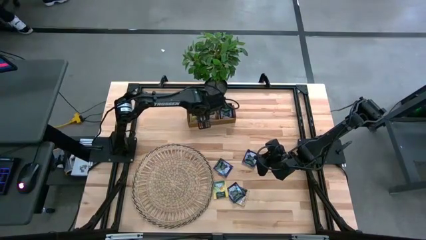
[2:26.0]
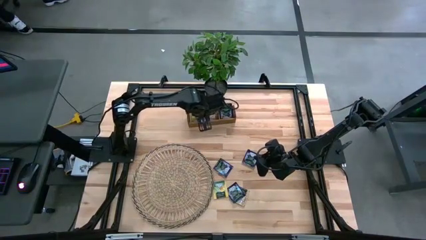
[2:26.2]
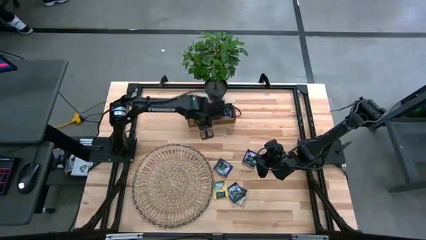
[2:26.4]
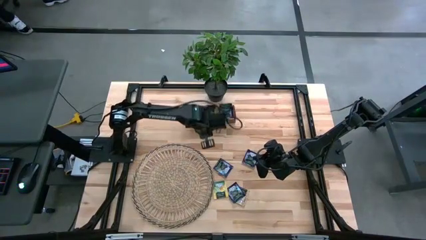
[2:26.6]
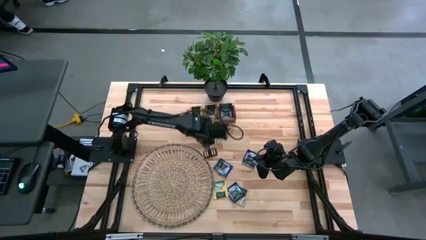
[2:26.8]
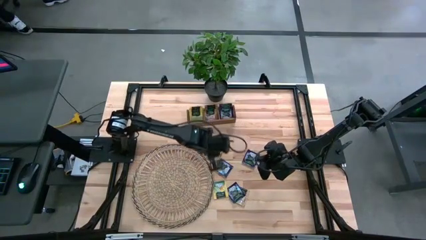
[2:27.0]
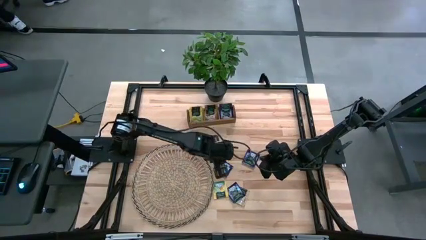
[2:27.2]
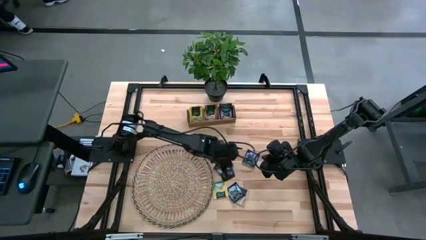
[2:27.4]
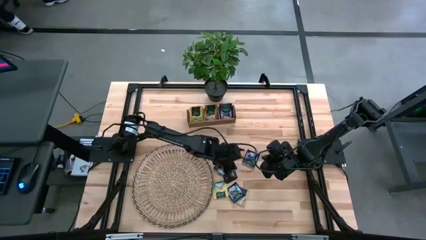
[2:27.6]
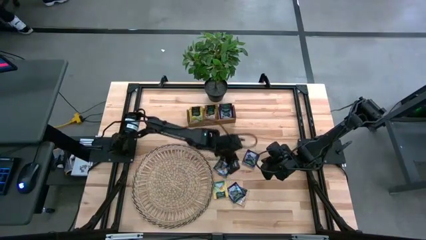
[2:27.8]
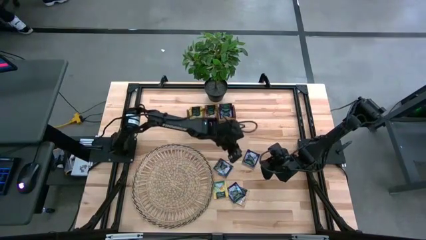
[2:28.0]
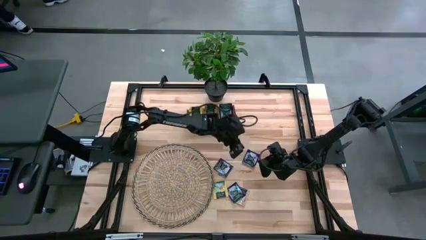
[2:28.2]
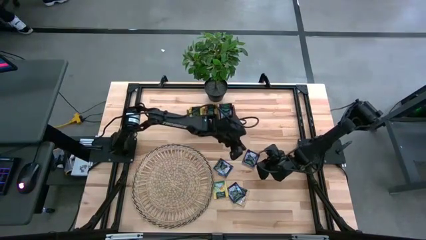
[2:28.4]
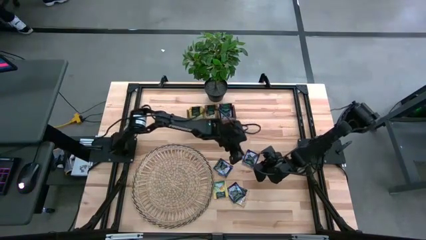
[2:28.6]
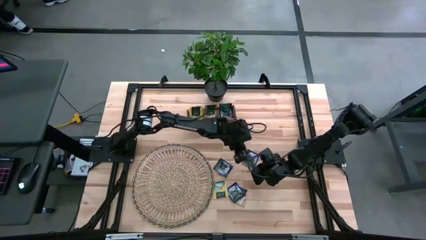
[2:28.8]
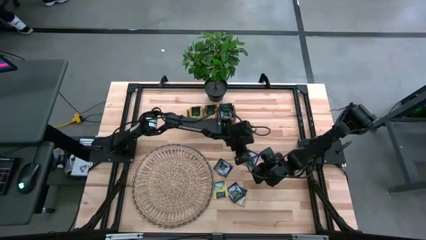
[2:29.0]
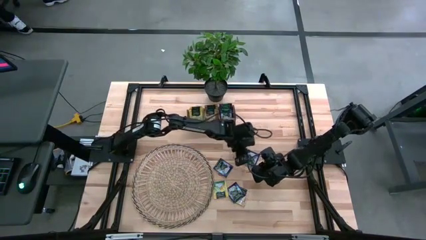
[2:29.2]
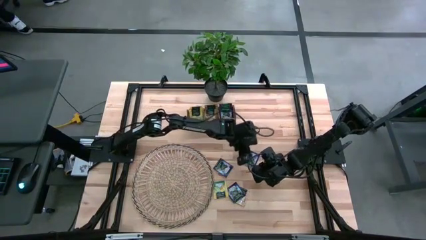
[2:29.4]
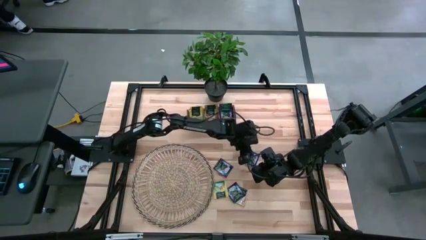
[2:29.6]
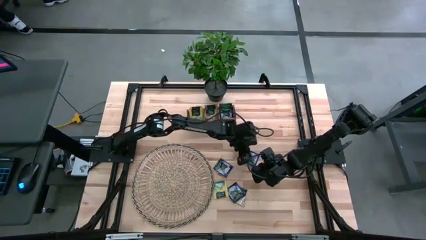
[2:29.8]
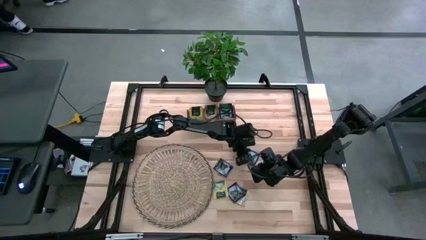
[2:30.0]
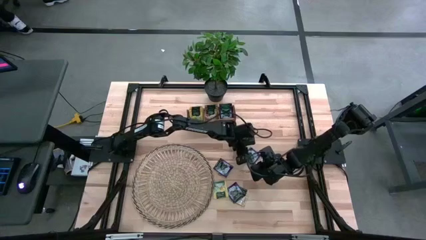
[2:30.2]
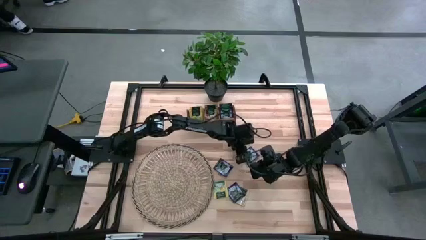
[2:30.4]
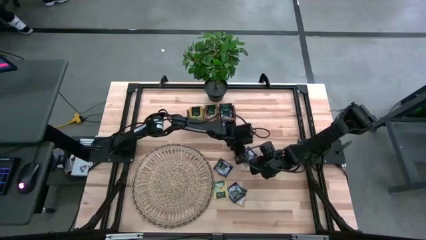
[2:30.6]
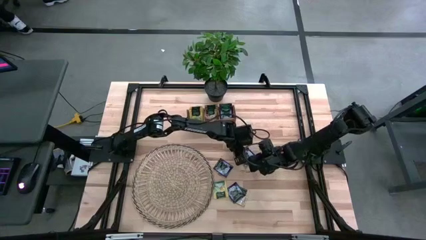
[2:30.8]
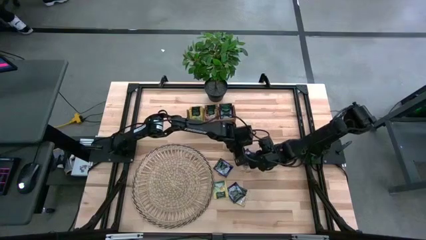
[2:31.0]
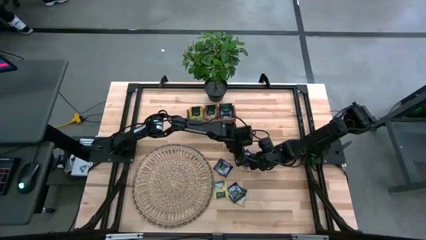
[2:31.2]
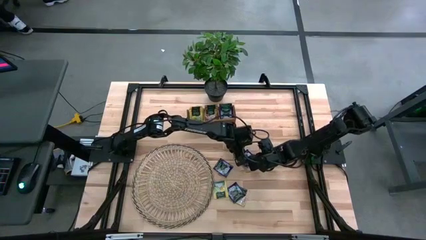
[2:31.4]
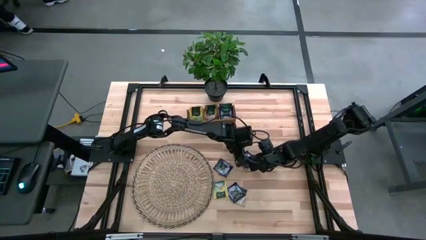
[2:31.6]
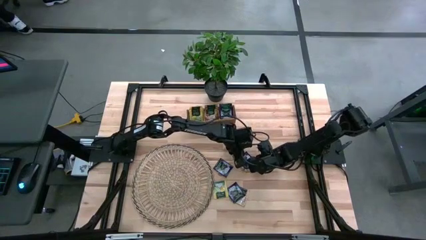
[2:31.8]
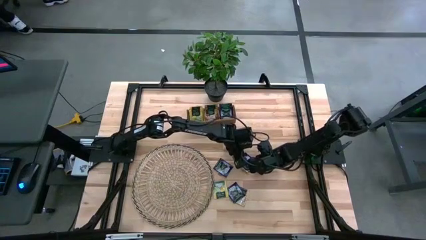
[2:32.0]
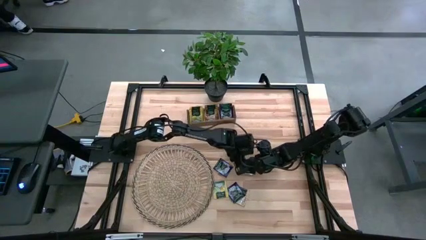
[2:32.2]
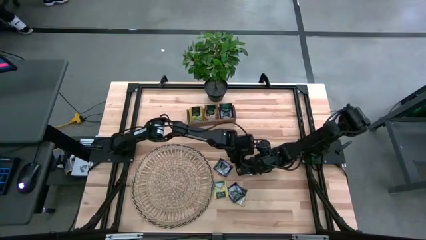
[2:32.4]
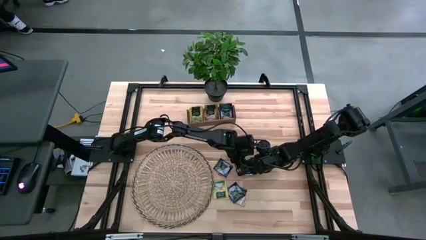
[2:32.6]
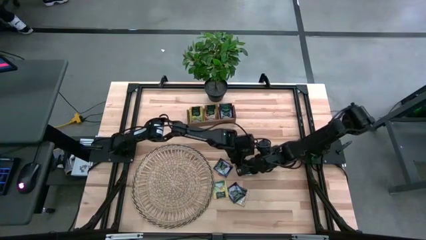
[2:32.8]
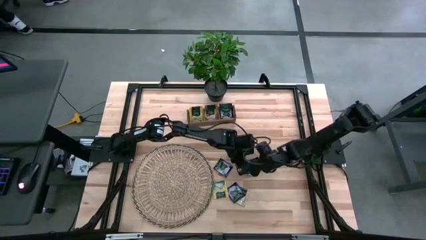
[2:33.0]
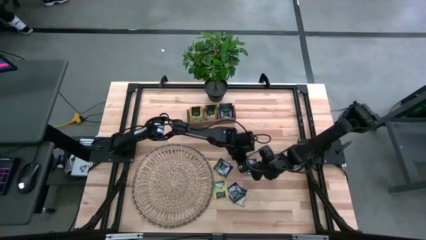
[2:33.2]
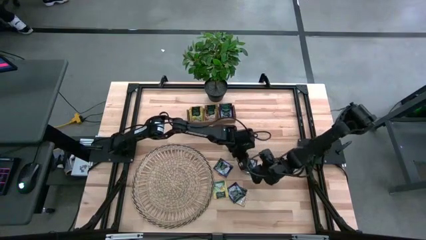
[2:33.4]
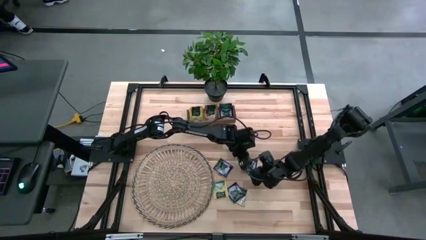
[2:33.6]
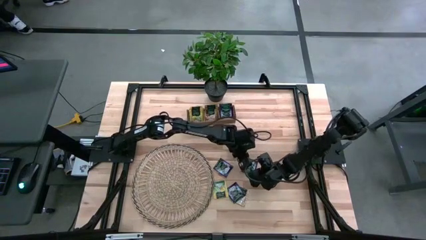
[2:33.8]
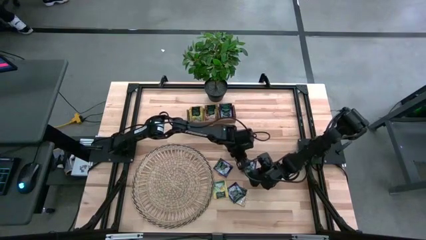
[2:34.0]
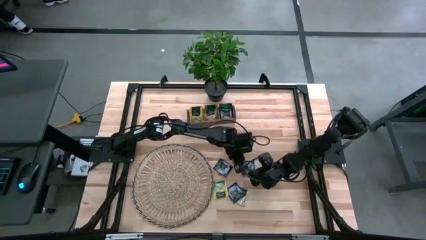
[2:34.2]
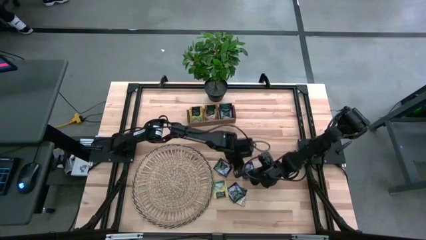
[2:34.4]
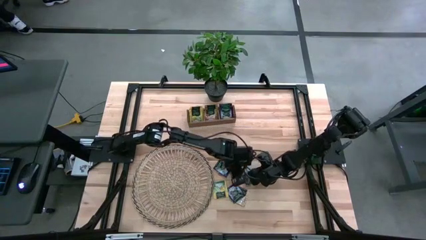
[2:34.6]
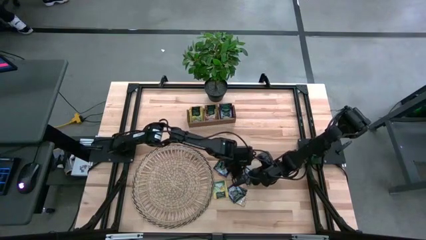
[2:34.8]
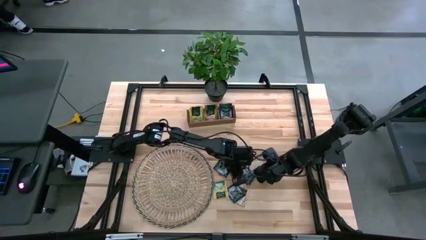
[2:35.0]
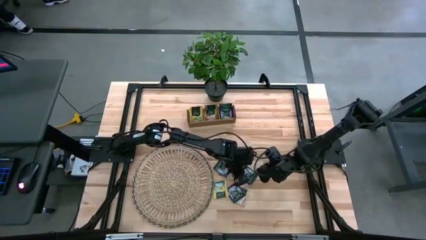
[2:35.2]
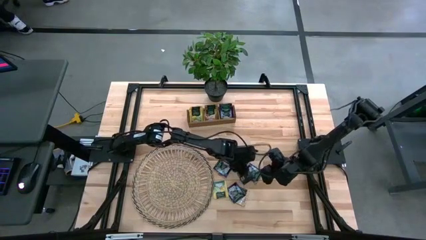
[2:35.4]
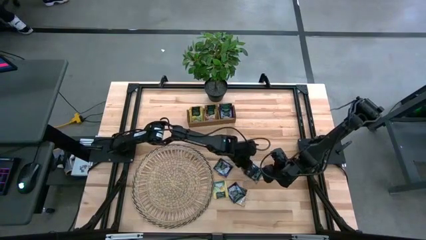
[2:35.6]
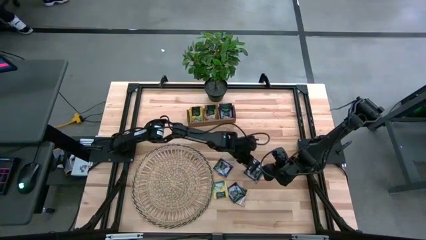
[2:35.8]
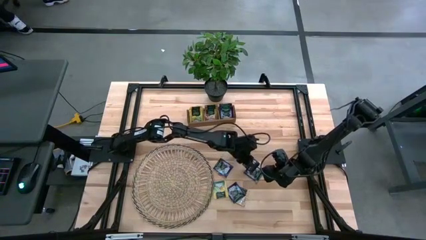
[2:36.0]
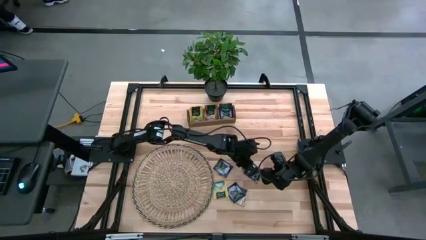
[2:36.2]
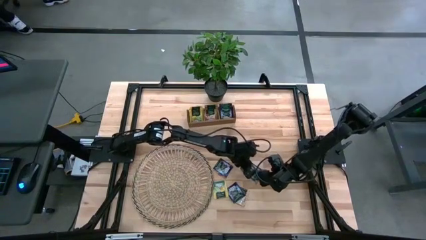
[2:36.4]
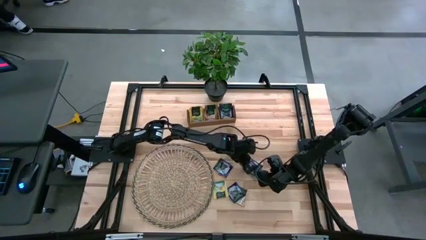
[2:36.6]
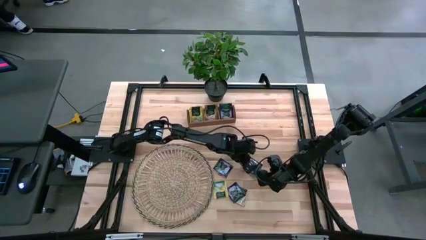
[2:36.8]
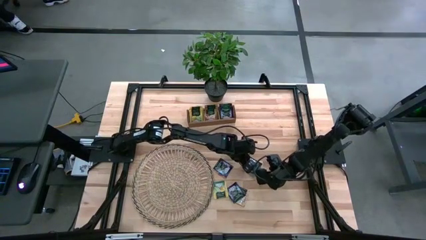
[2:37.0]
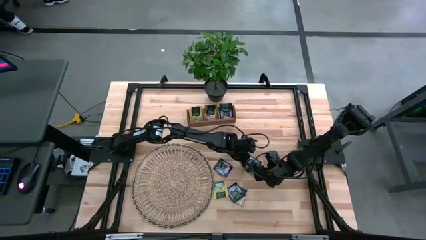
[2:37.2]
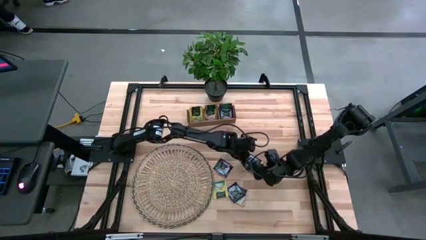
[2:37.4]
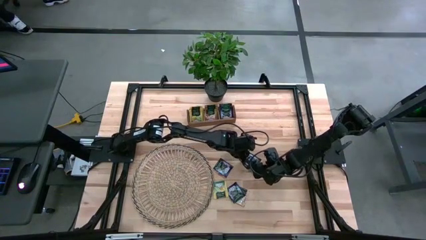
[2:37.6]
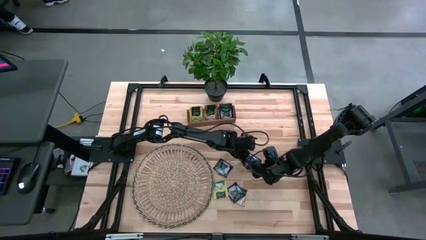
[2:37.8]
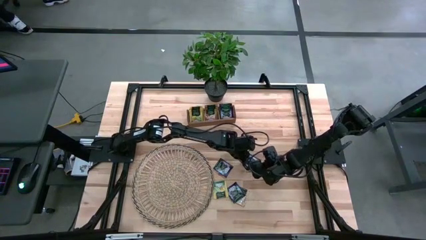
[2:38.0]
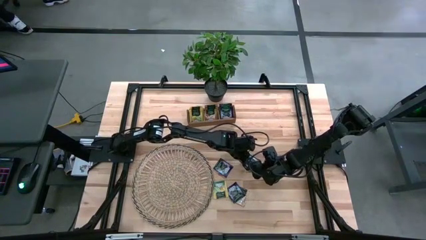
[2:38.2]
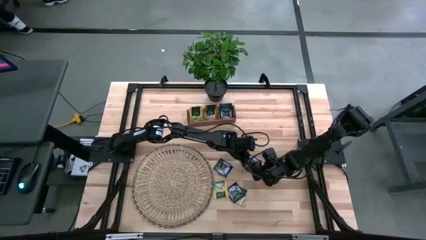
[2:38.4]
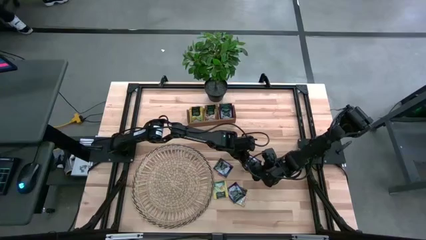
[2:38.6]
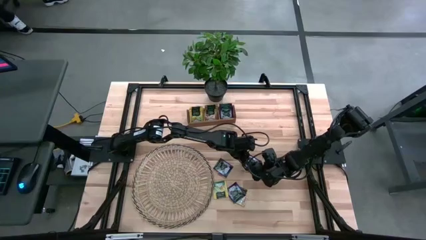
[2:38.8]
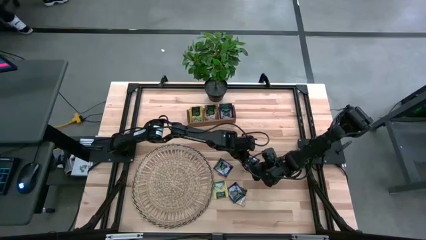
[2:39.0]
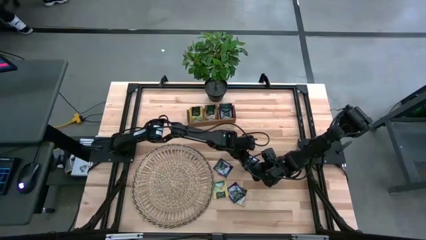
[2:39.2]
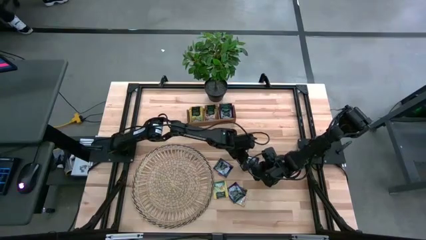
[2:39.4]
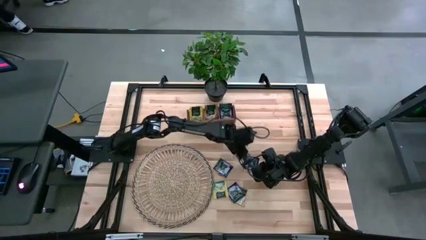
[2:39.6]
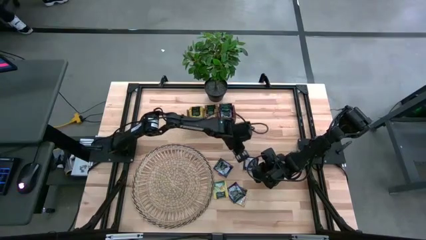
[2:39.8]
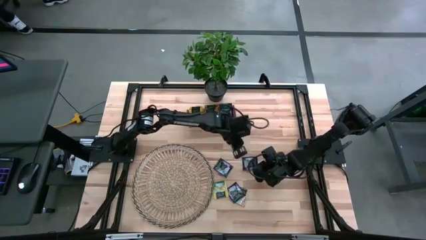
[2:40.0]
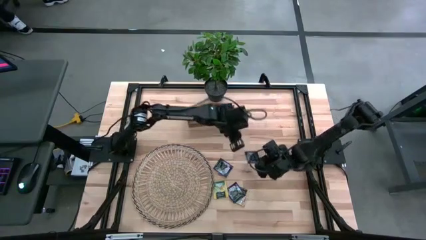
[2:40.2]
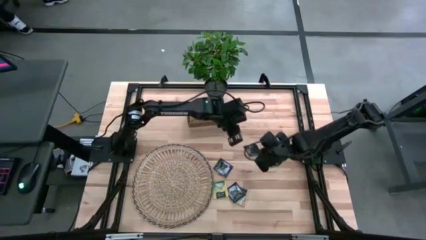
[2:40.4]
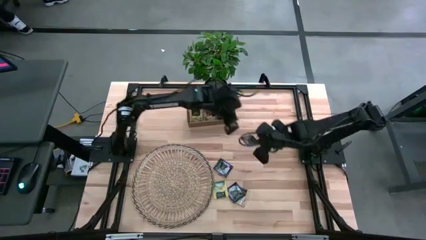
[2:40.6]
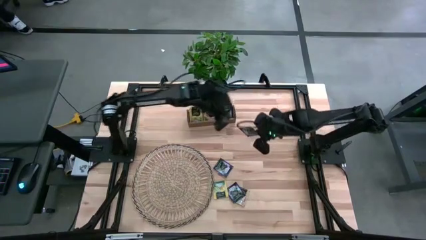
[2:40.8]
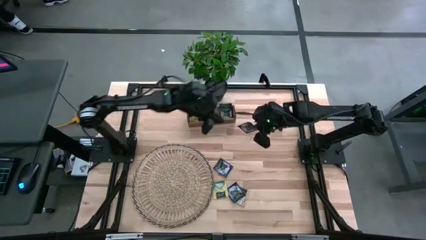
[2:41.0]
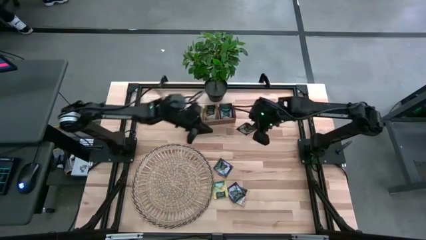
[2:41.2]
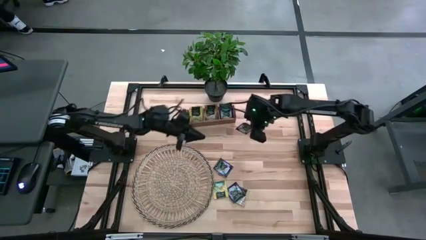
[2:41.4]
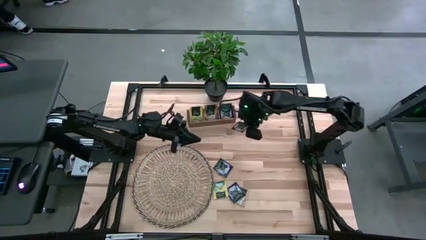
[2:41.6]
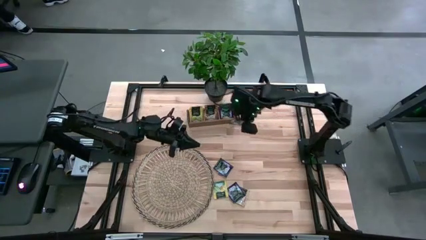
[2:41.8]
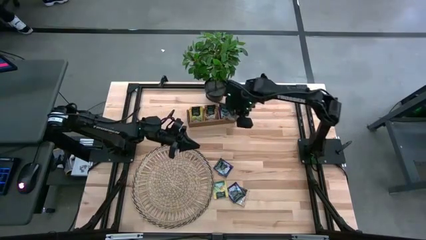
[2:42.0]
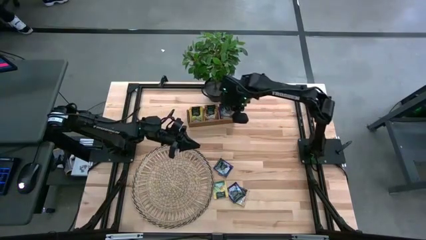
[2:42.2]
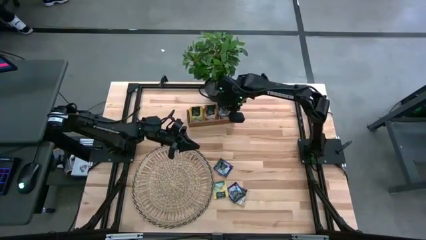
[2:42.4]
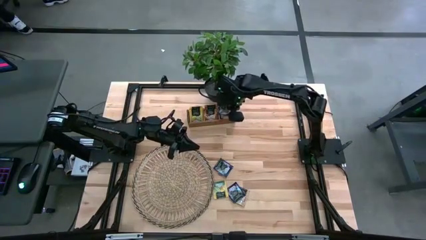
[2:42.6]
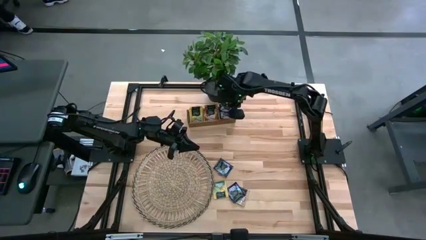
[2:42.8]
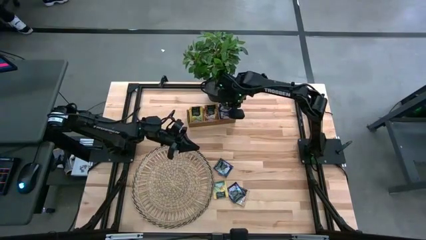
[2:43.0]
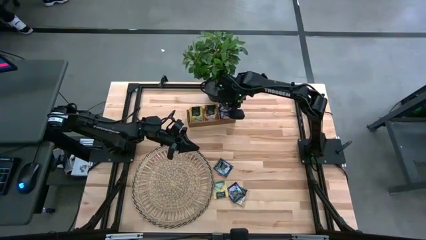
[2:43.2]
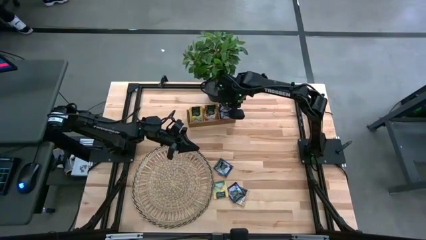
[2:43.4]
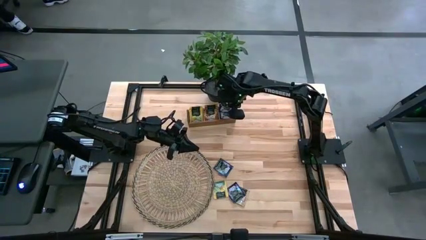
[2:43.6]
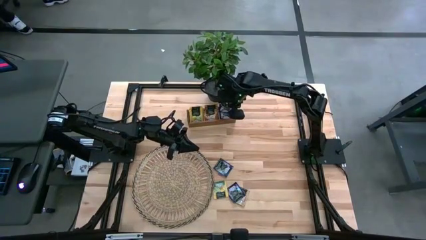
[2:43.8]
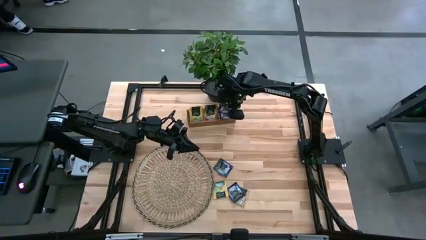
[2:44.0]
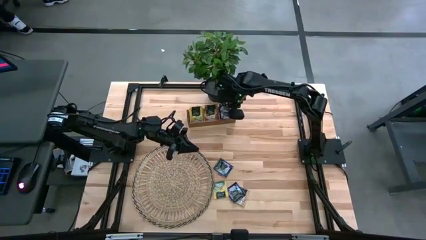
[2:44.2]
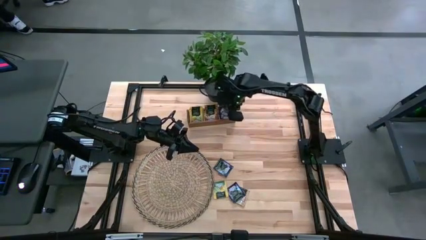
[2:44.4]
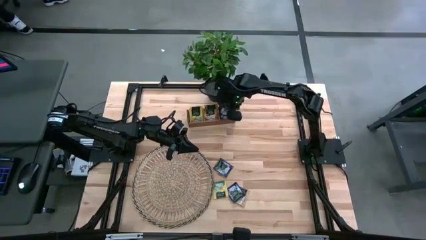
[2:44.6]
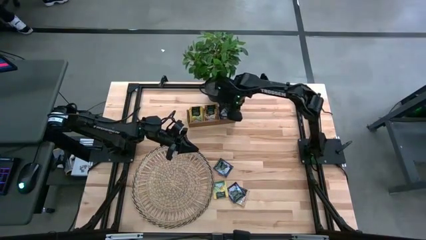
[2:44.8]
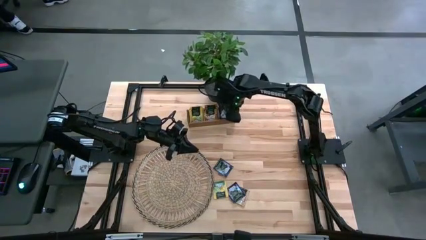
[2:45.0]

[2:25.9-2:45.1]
Task: Pick & Place Tea
Put the blue tea bag into the right section of the wooden organizer
